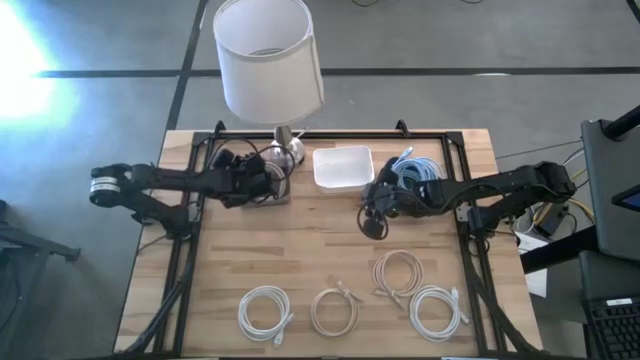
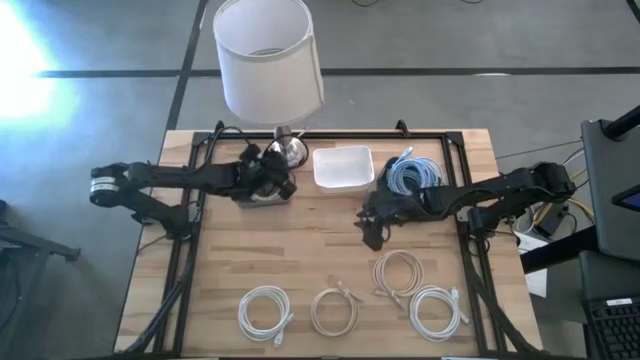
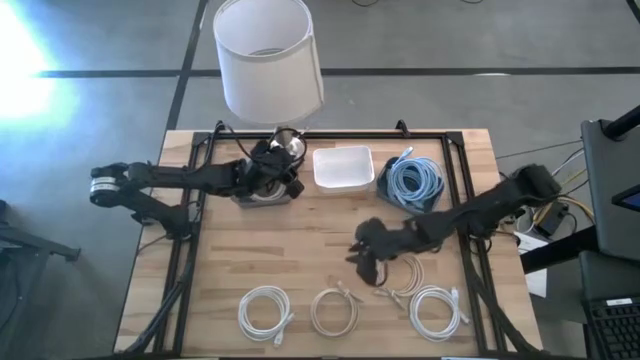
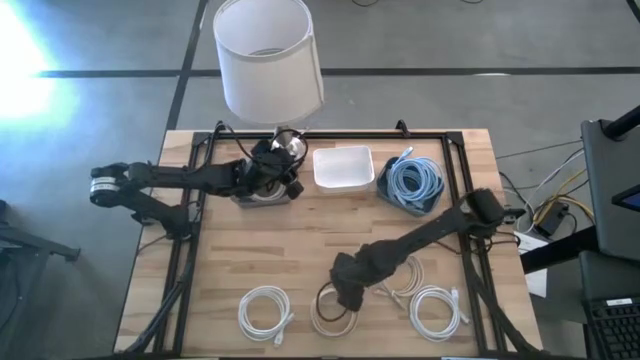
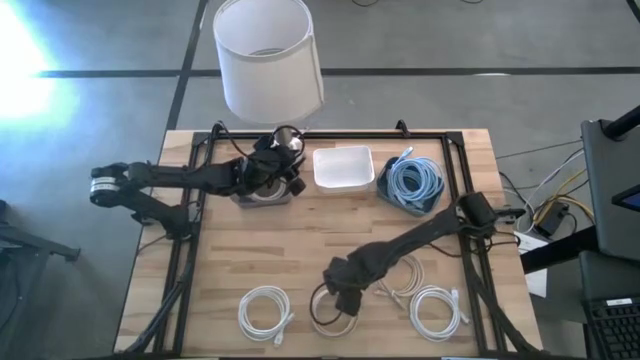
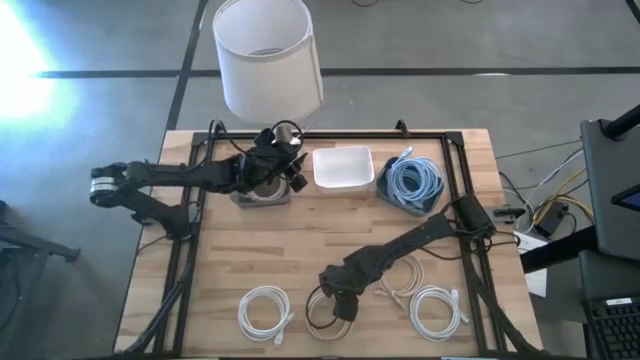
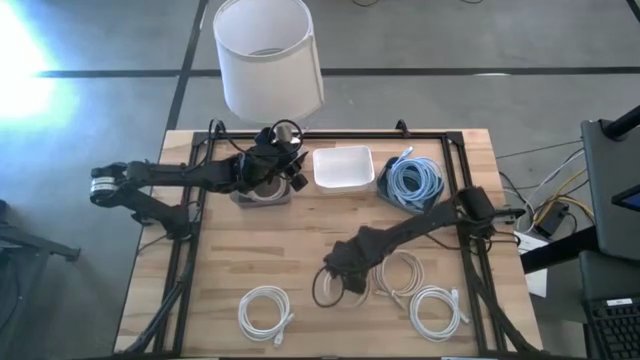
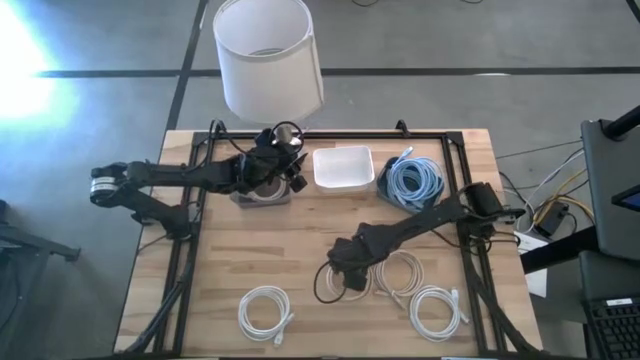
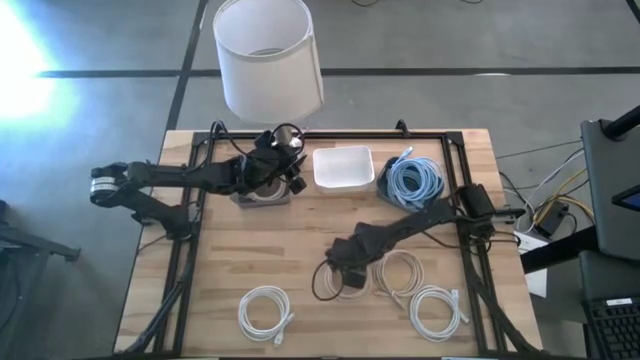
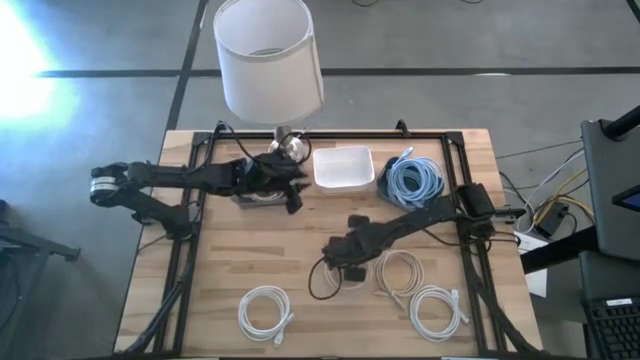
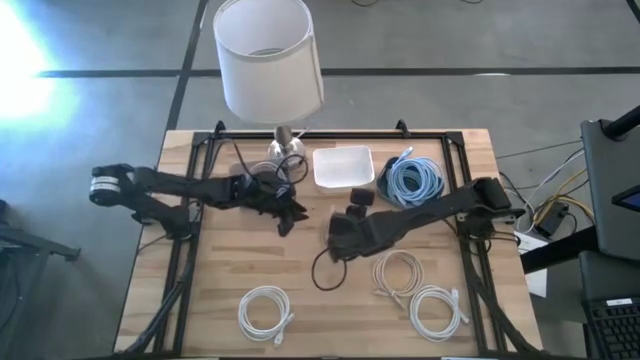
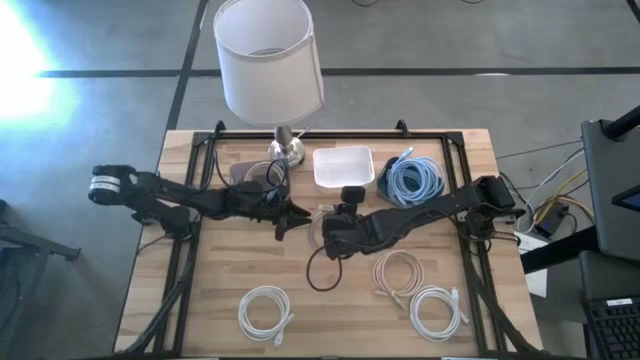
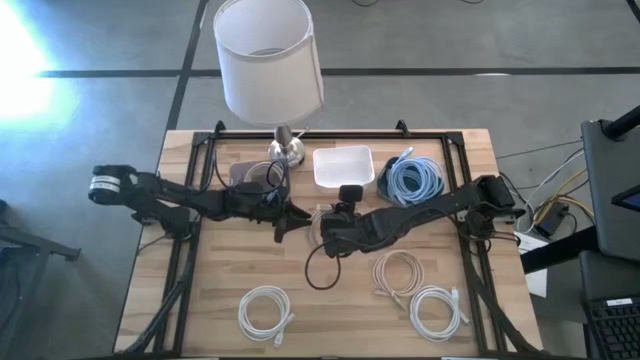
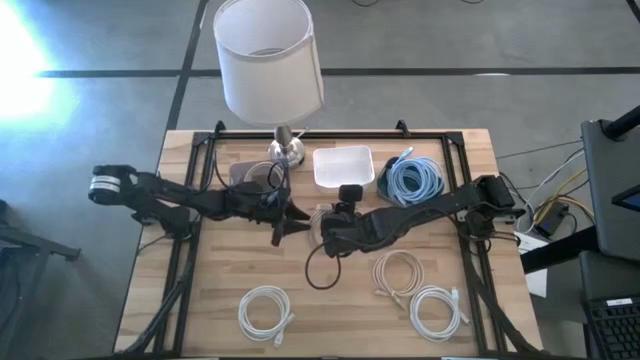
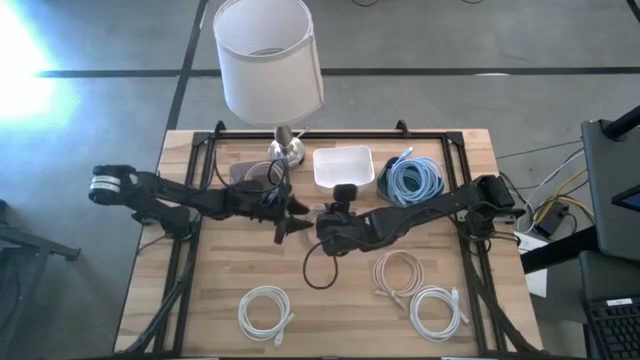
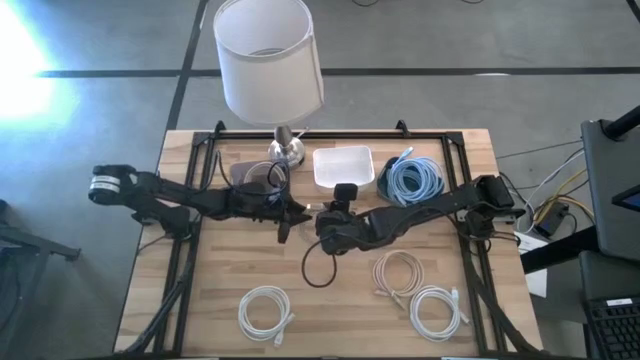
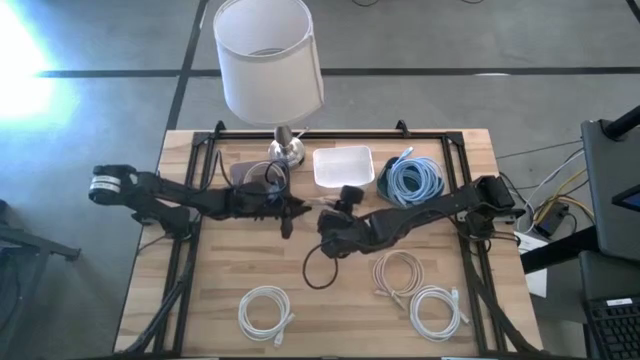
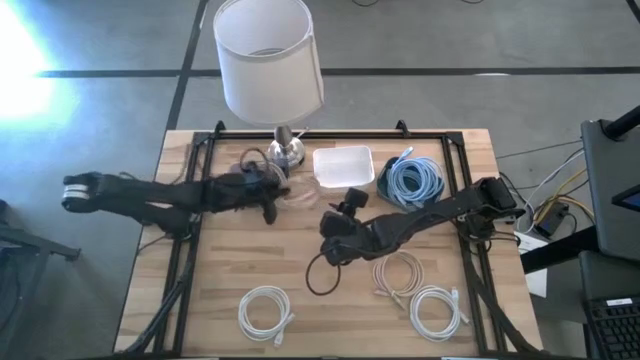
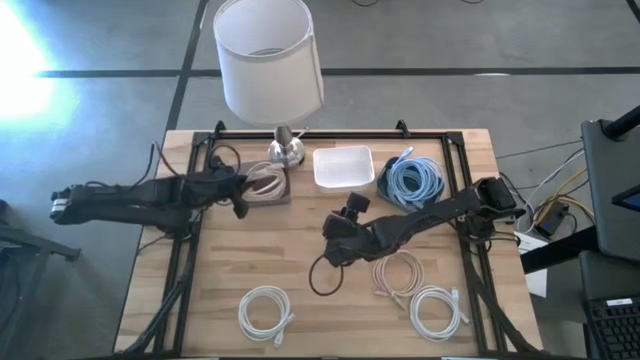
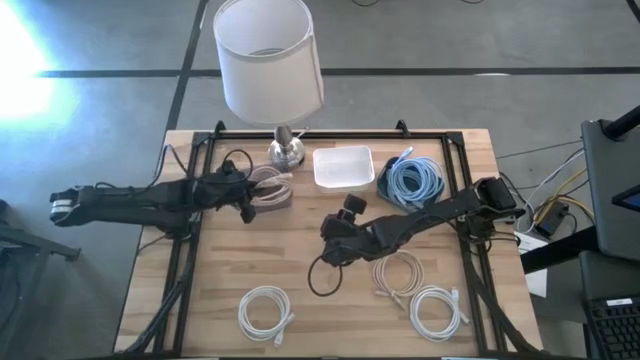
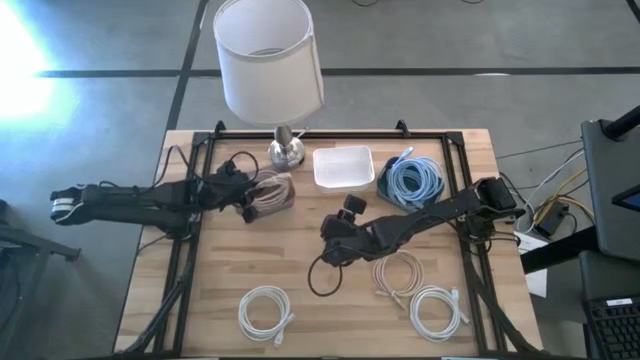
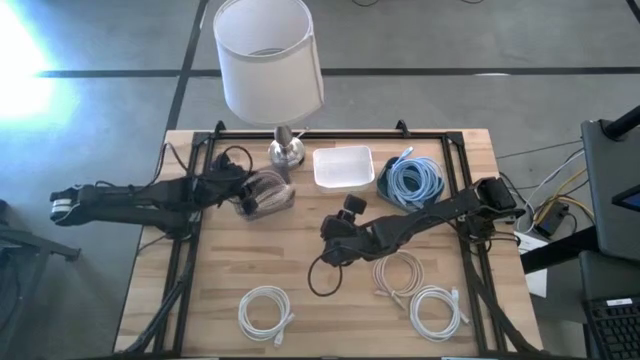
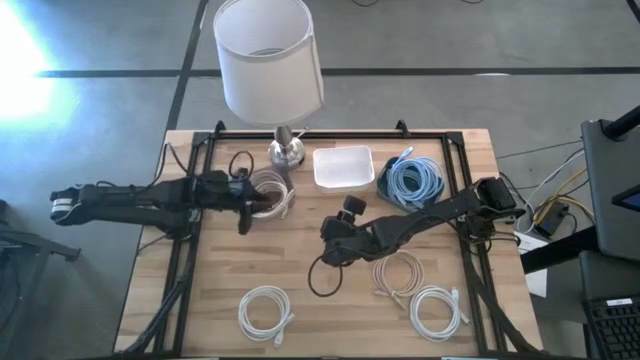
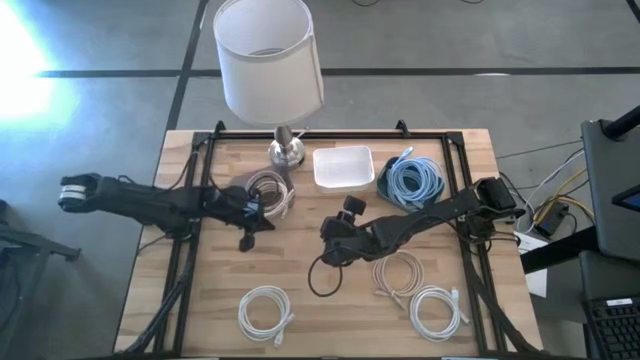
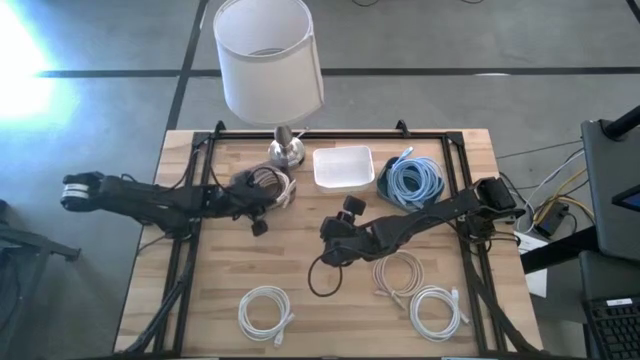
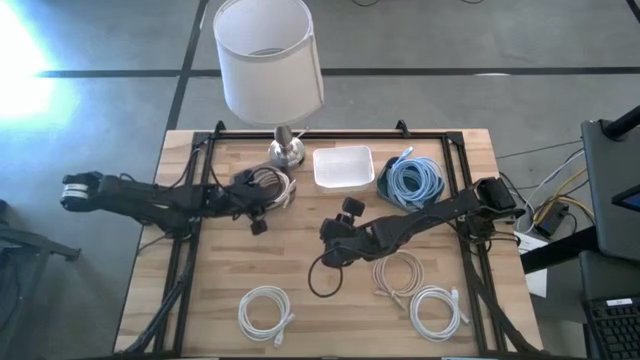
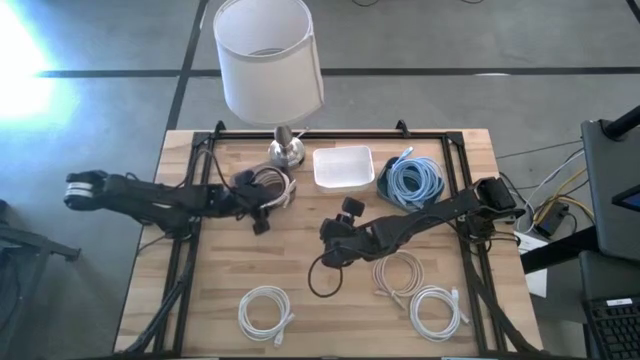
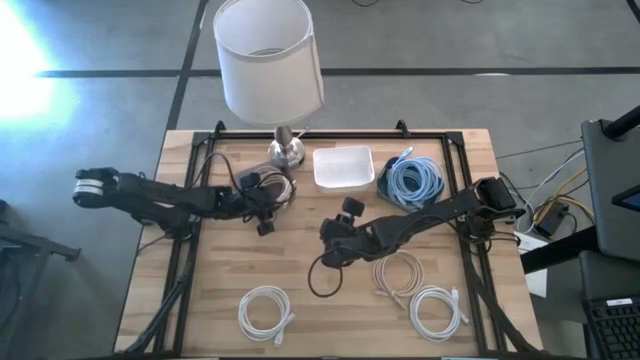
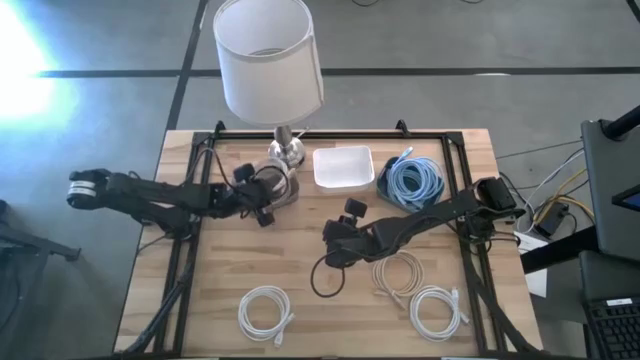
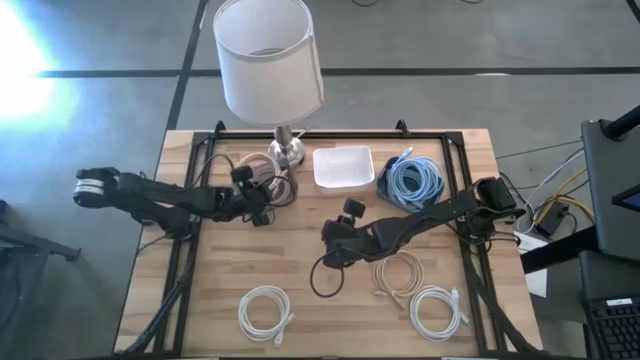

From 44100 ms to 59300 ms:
Task: Sort HDMI cables
Put the bottom brown hdmi cable into the black bin
